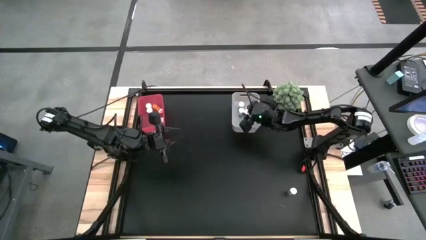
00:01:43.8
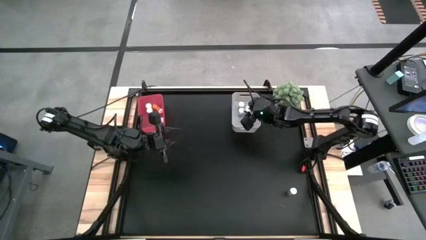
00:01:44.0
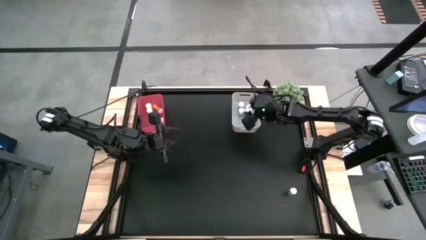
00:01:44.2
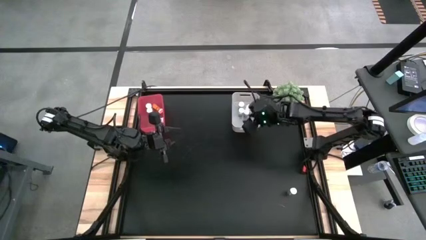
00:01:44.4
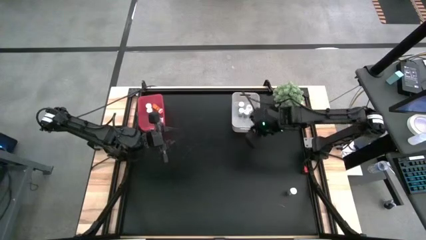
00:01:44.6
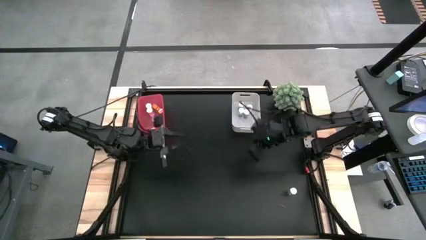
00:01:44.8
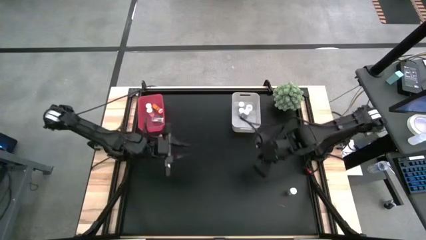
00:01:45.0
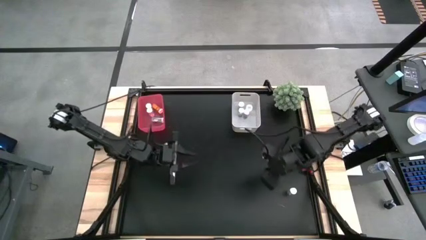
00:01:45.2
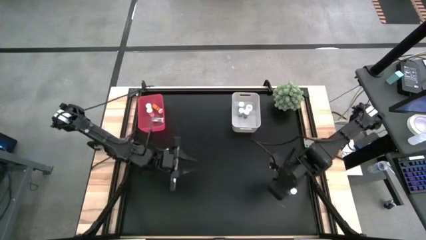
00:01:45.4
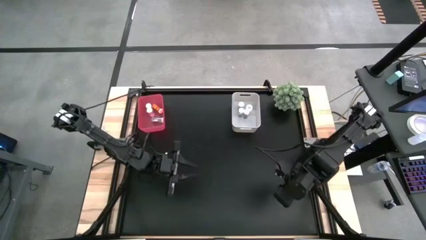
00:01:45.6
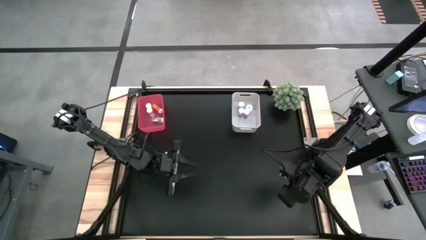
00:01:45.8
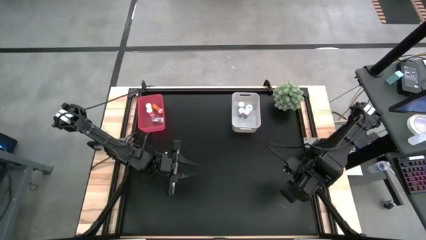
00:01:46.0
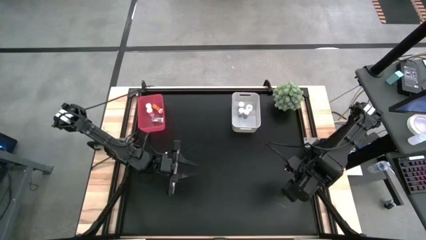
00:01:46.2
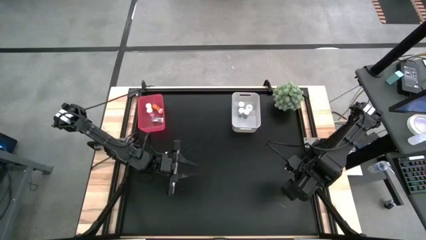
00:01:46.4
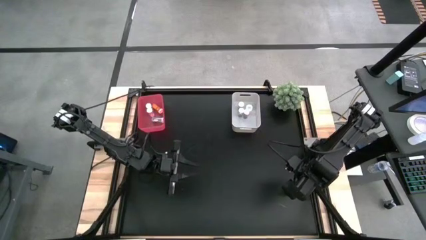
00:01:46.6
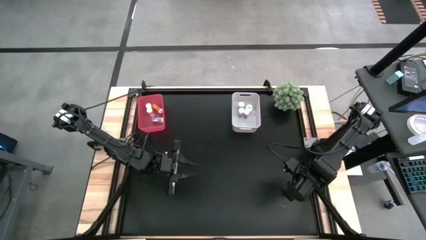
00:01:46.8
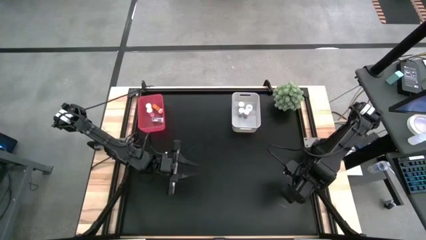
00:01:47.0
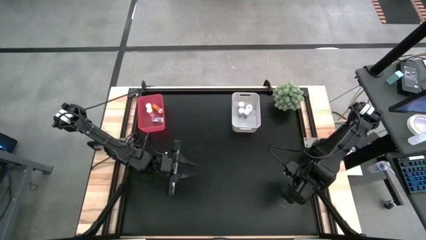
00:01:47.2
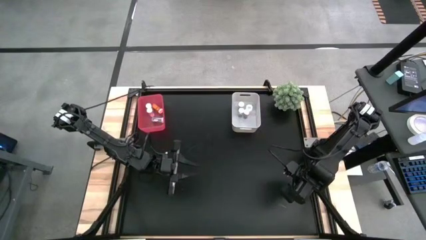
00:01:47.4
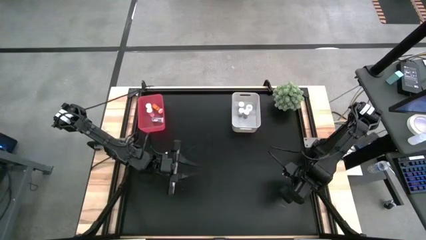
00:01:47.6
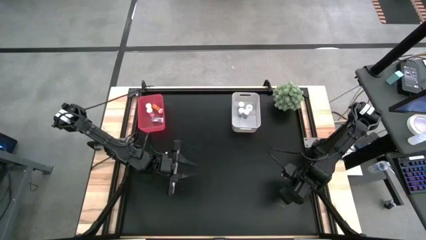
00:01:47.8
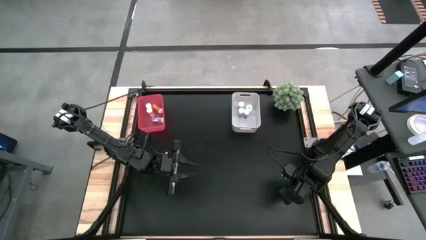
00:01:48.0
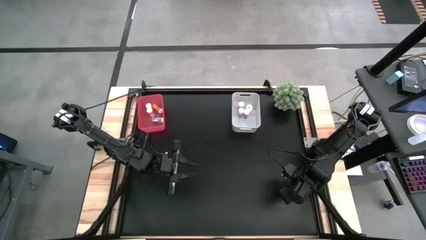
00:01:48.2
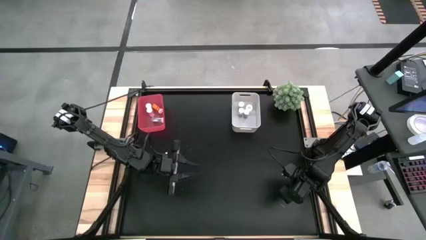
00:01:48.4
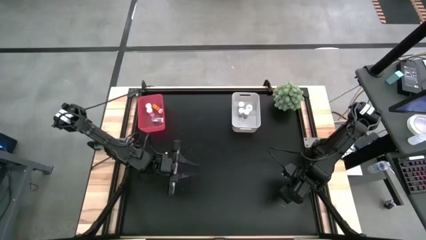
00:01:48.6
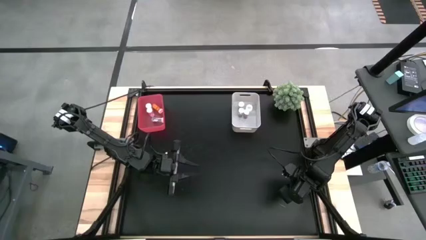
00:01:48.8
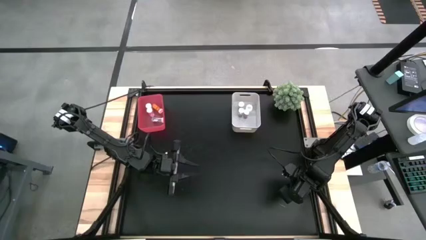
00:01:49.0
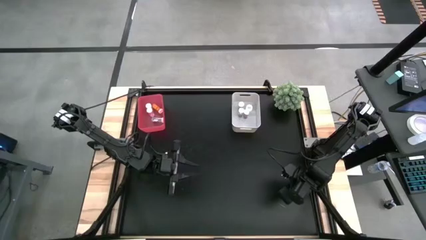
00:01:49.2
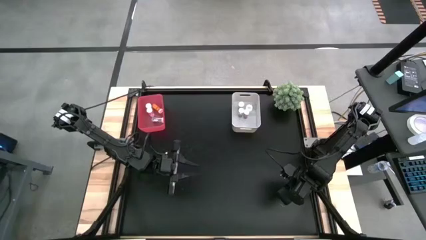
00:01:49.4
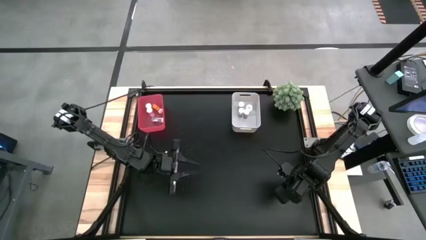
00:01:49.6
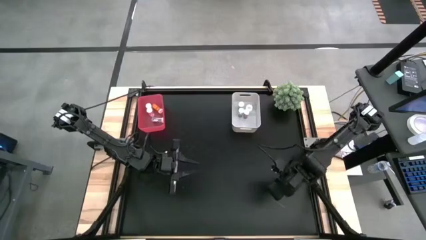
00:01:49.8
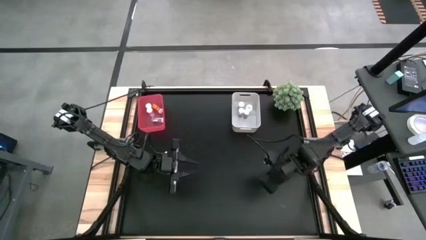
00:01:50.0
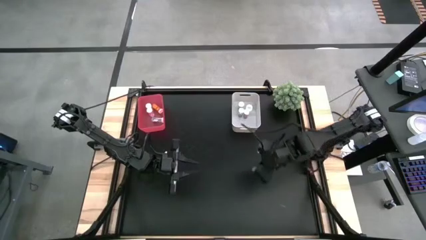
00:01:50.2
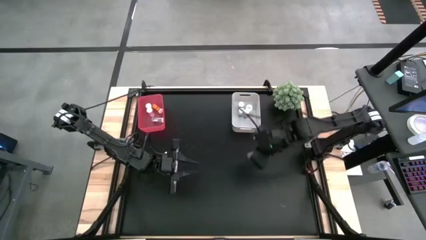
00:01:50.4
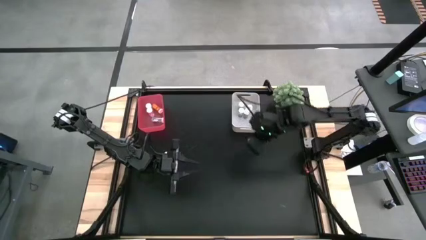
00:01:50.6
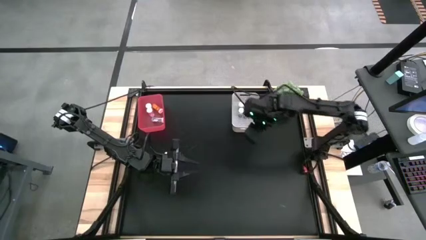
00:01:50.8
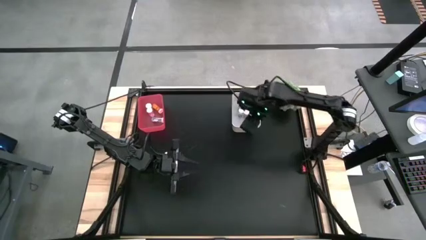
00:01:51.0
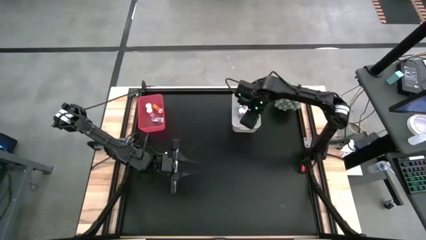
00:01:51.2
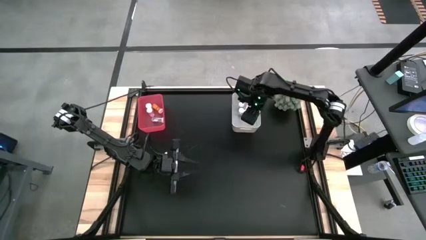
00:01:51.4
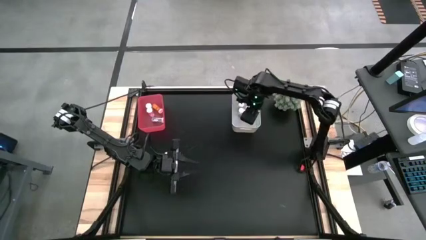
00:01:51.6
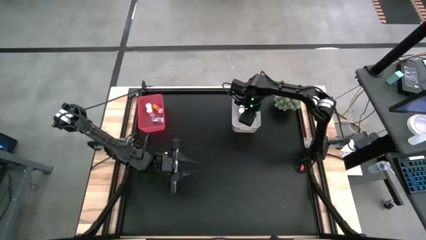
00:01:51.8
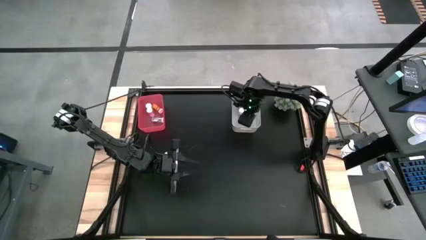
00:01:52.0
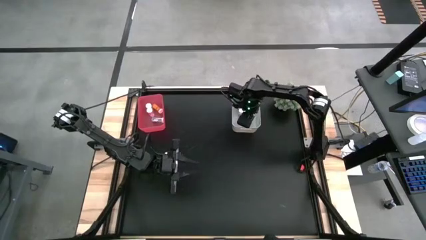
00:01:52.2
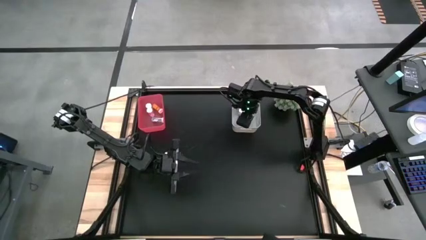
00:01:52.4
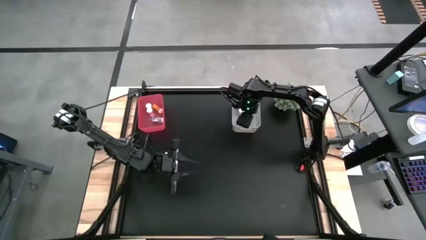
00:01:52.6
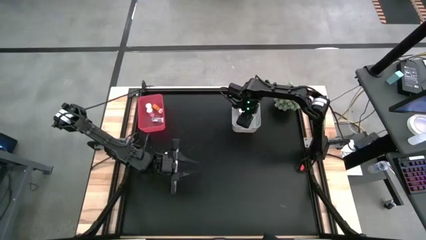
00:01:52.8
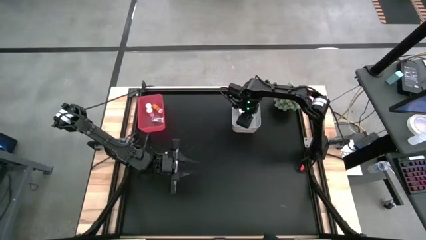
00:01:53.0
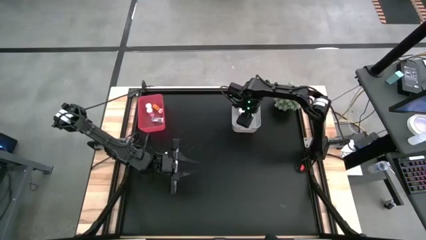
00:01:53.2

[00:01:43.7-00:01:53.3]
Task: Pick and place medicine bottles into bin by pill shape (circle, oval)
Put the blue capsule bottle into the white bin

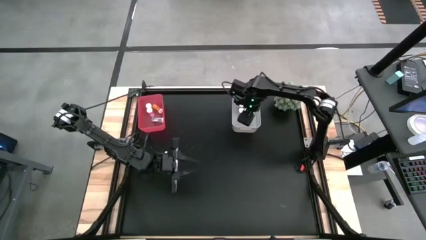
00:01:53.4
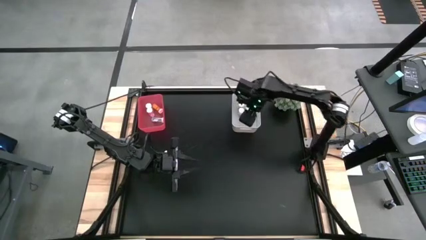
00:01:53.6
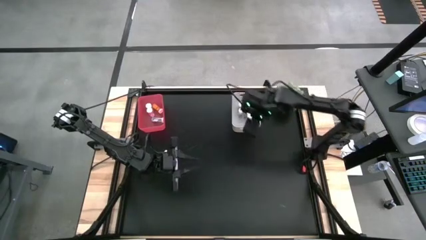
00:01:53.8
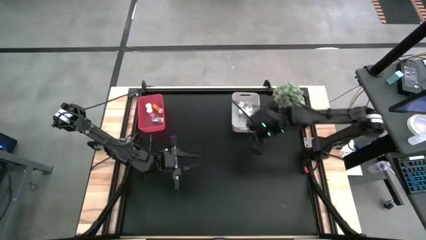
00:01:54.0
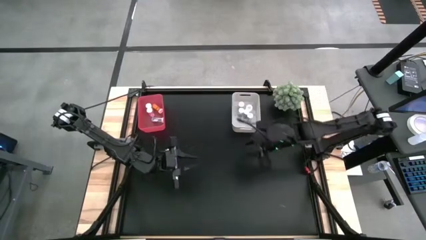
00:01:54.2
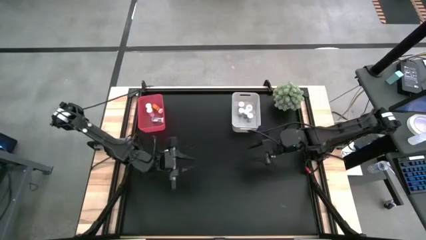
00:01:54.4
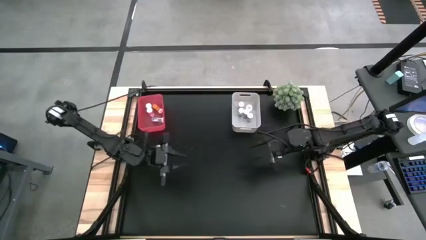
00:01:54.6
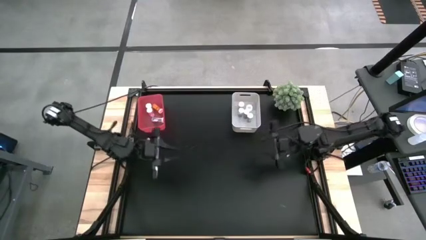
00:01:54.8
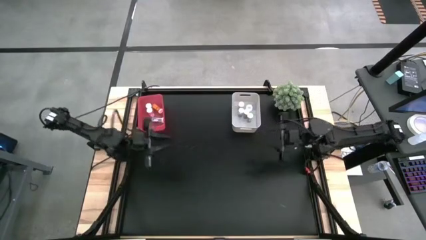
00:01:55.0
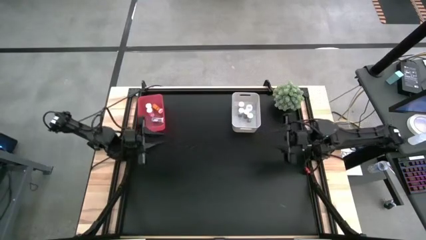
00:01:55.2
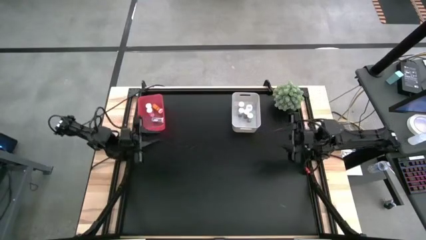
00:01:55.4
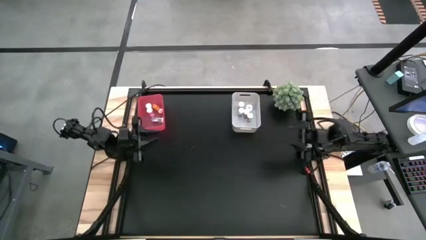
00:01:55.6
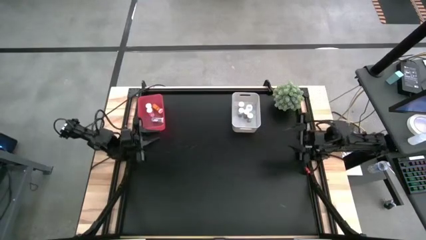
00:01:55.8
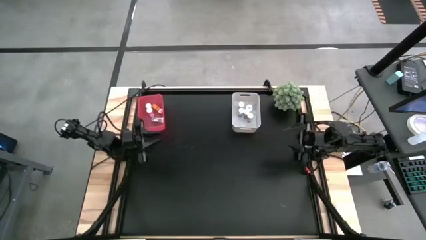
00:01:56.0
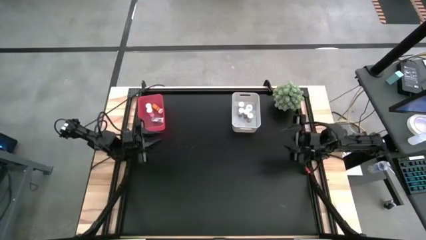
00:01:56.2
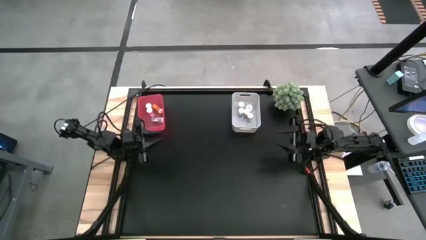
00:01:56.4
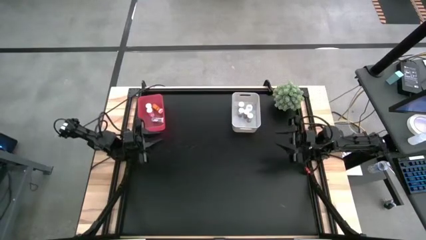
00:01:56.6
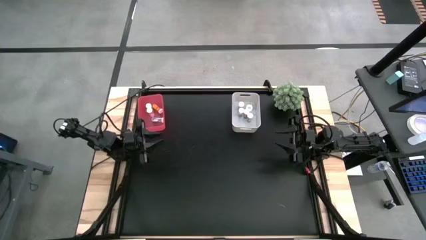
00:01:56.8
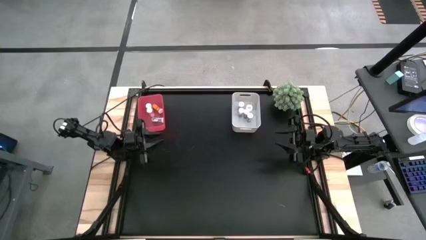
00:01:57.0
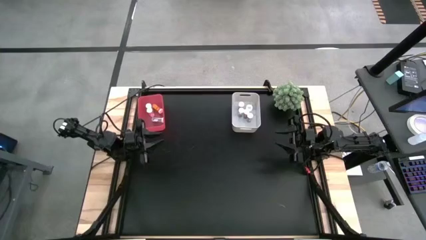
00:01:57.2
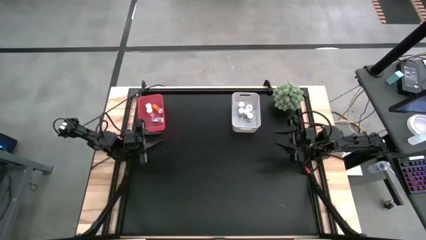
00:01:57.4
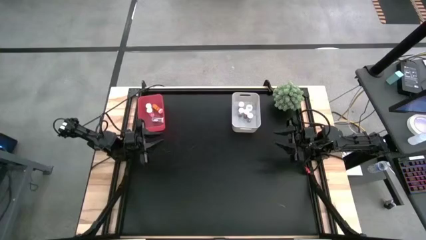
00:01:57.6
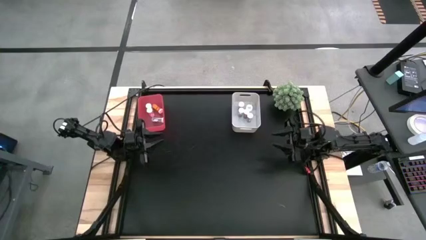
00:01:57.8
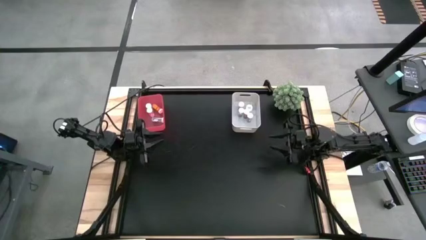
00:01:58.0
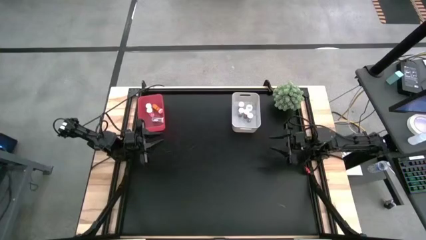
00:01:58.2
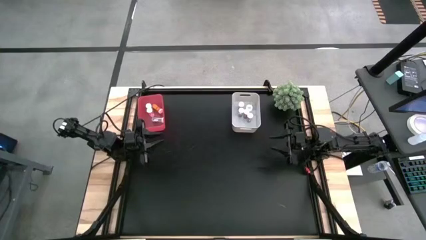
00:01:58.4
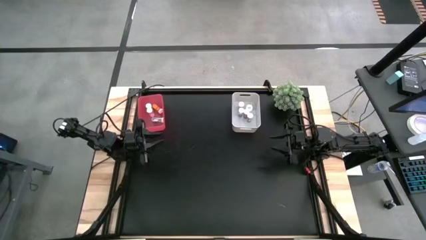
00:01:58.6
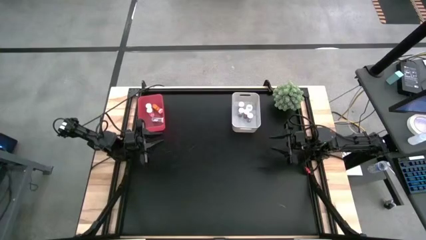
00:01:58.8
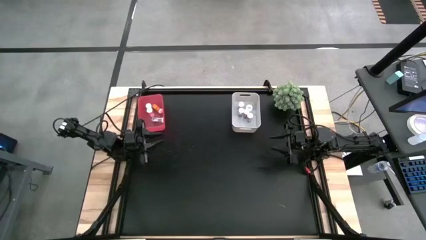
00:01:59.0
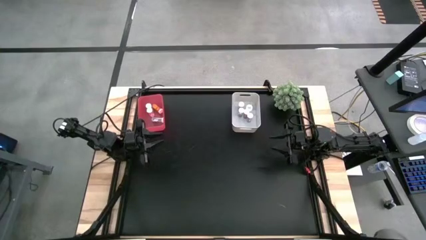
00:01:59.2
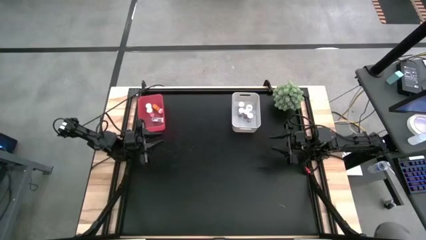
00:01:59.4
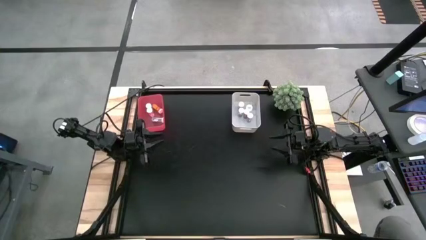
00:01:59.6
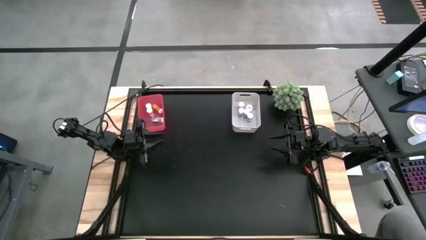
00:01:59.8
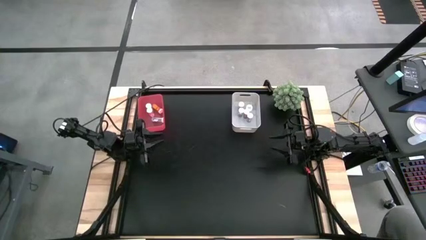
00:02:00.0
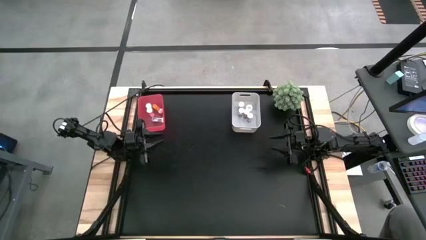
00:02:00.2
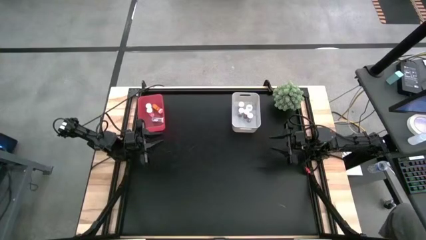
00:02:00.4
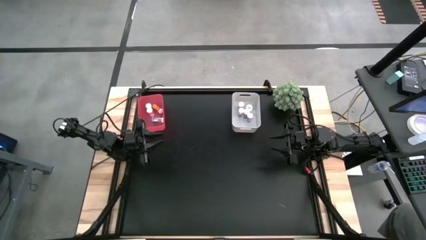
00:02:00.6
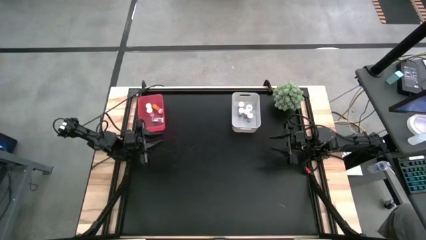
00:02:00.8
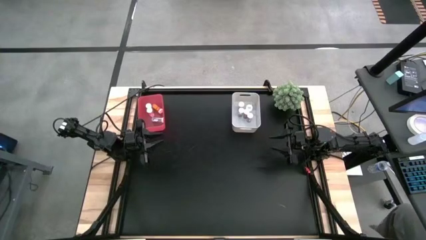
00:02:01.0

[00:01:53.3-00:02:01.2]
Return to Home Position
